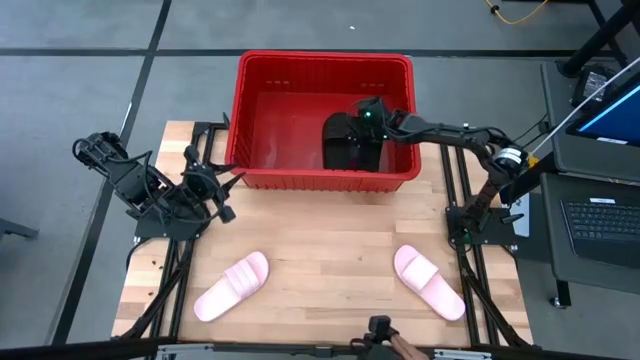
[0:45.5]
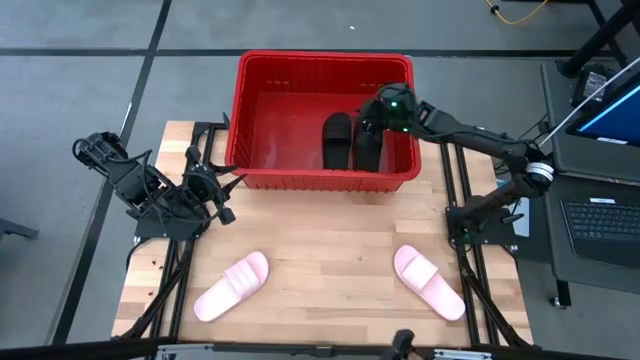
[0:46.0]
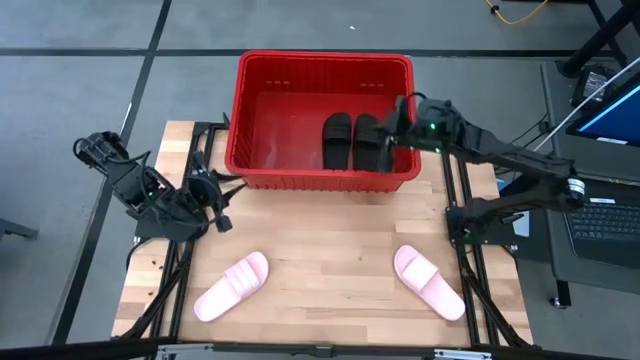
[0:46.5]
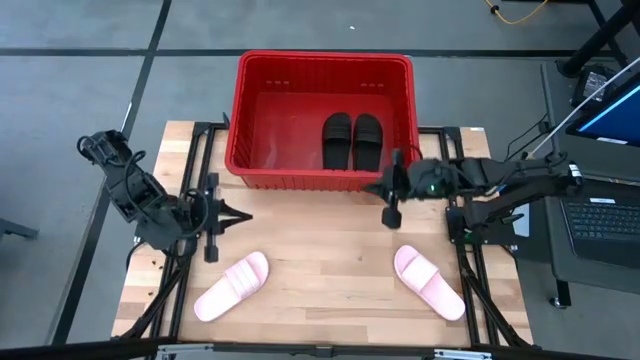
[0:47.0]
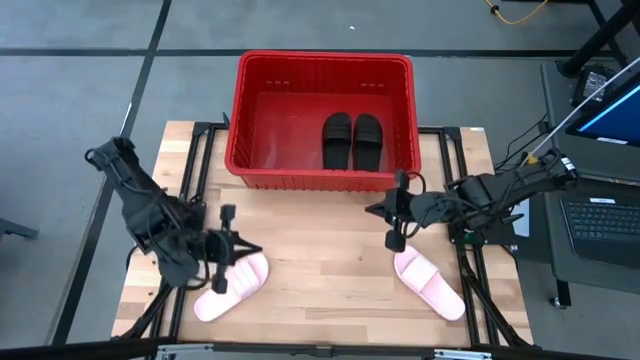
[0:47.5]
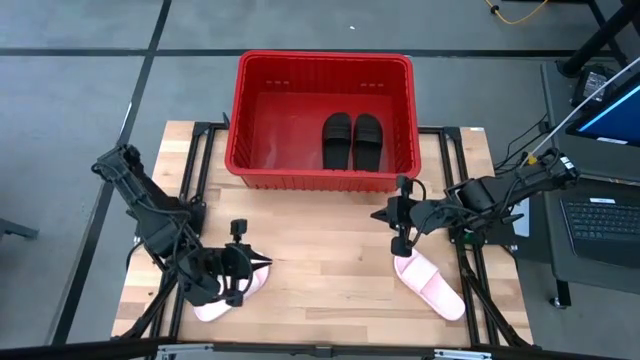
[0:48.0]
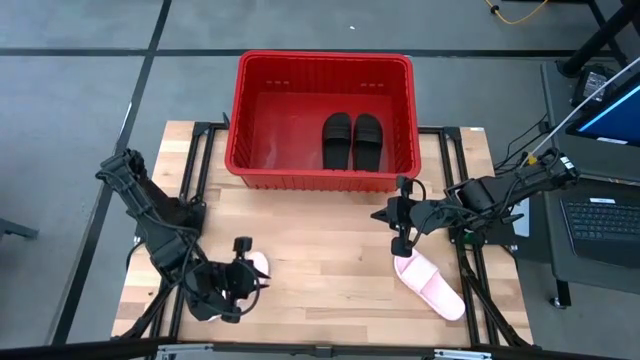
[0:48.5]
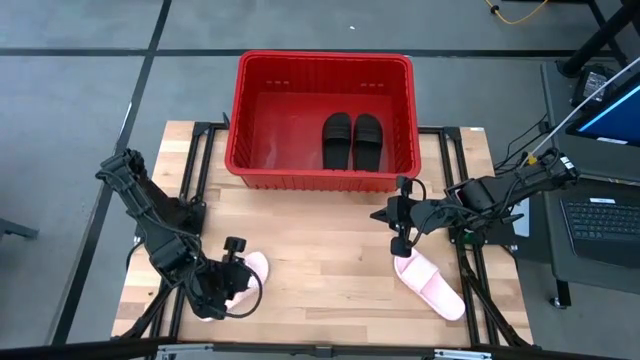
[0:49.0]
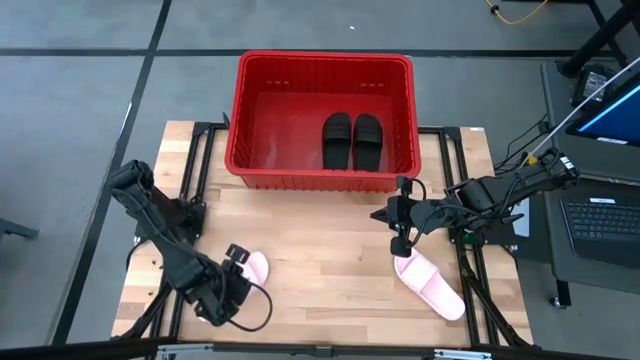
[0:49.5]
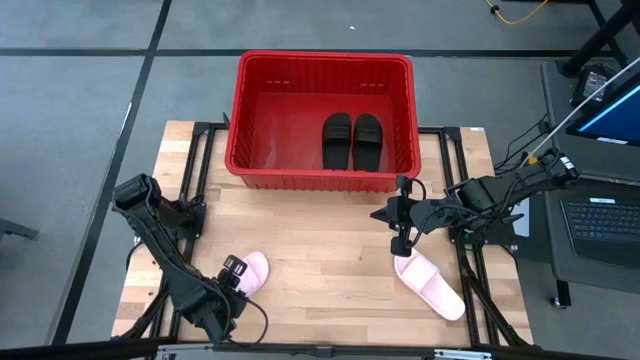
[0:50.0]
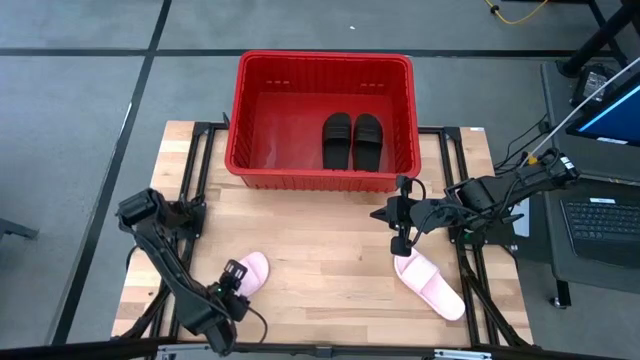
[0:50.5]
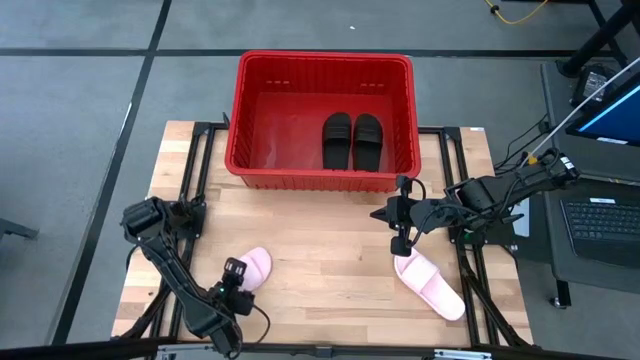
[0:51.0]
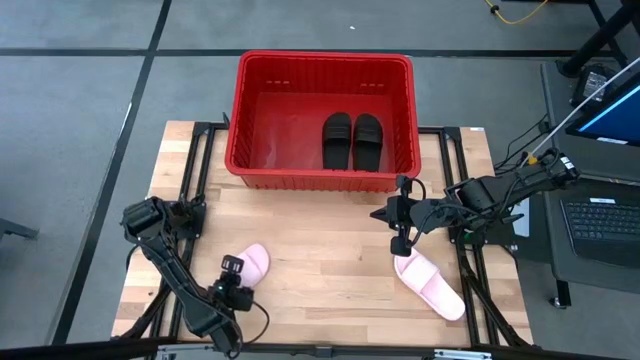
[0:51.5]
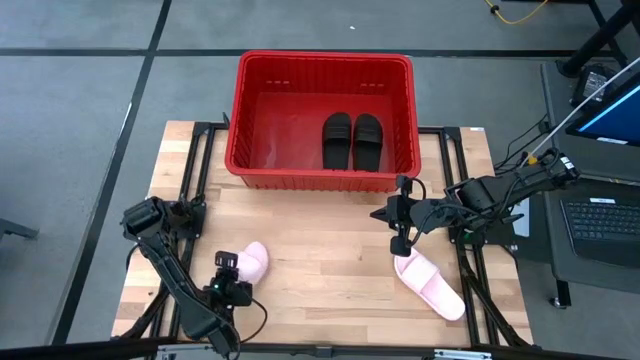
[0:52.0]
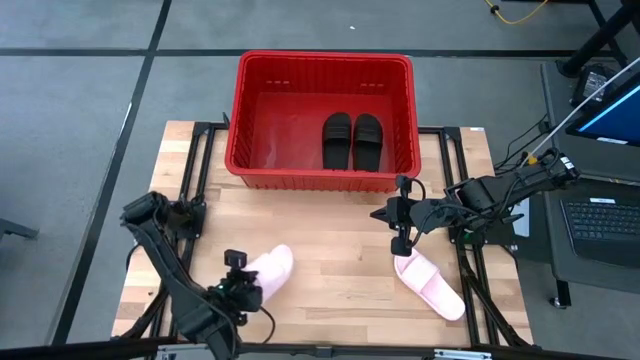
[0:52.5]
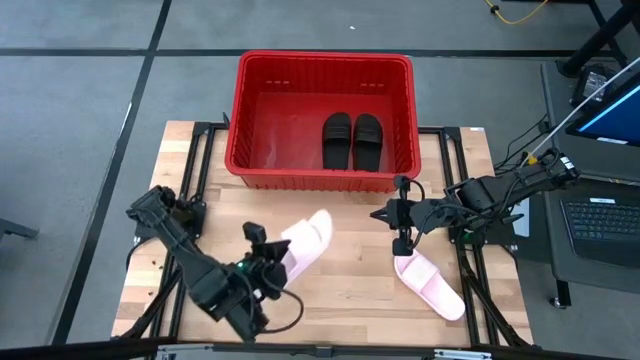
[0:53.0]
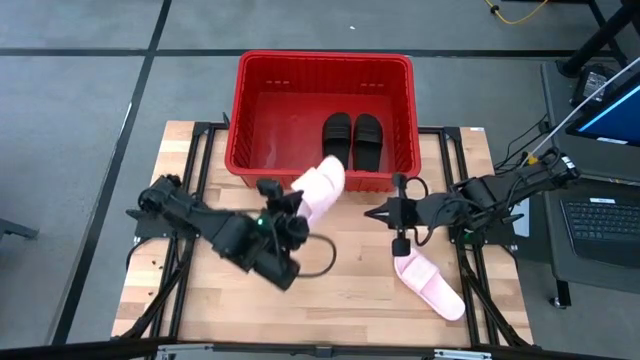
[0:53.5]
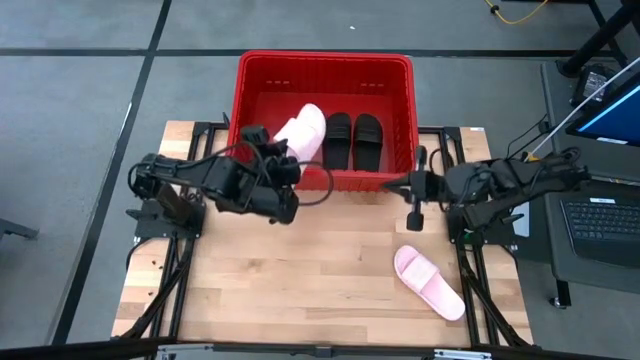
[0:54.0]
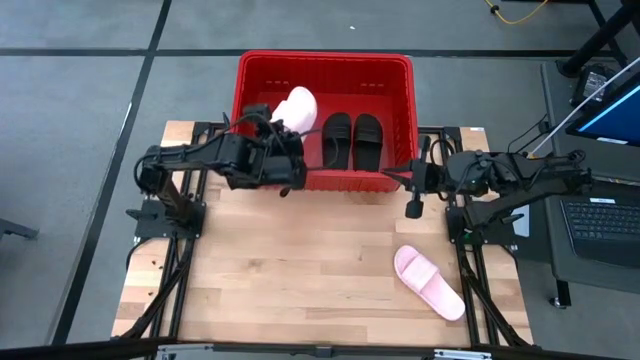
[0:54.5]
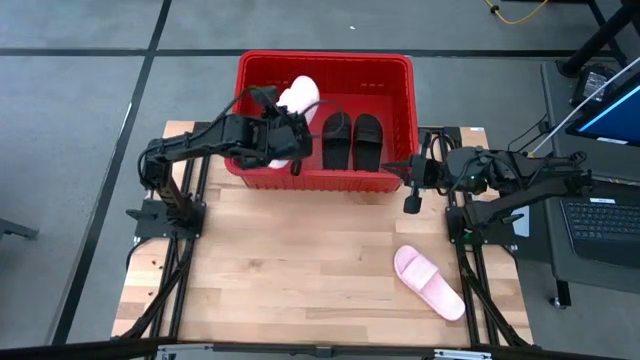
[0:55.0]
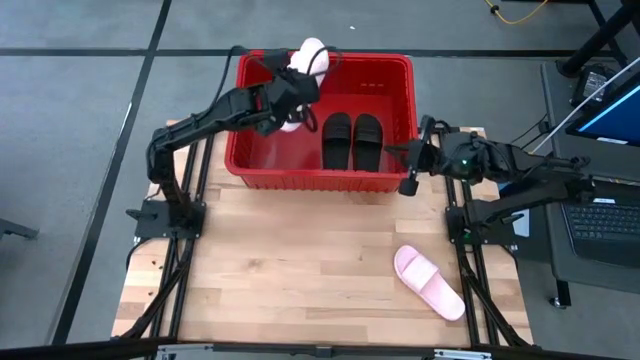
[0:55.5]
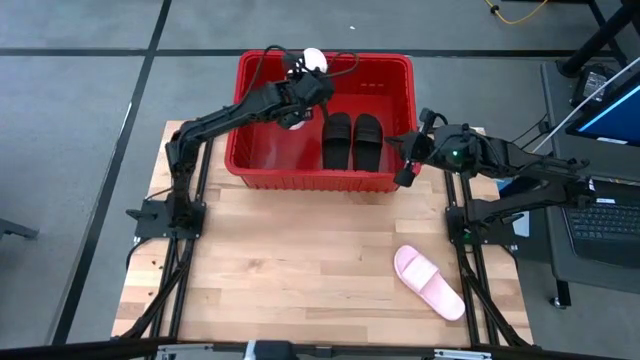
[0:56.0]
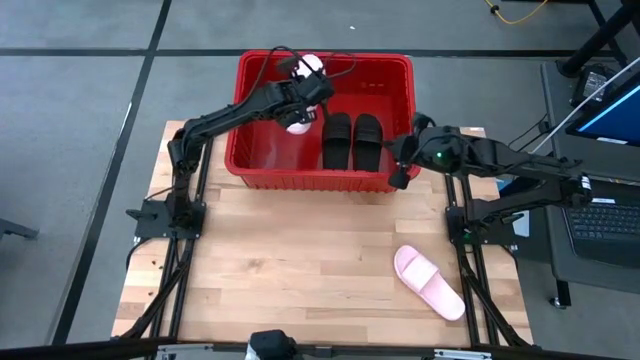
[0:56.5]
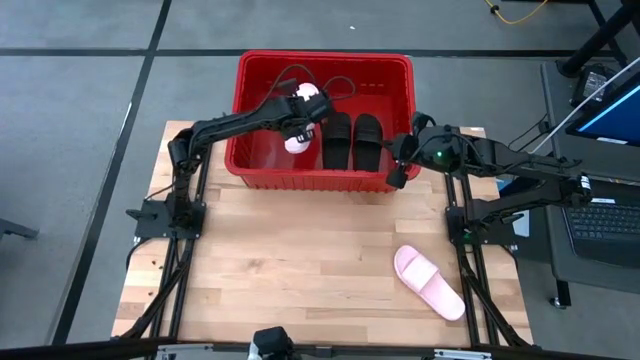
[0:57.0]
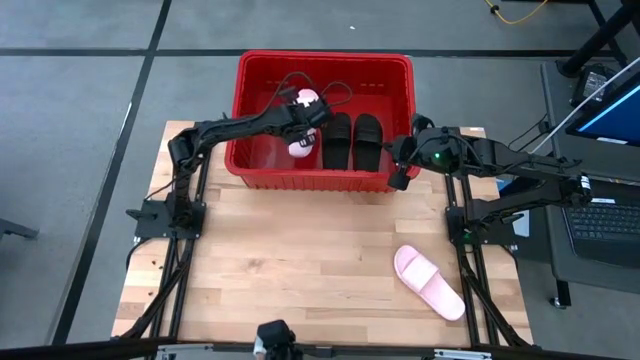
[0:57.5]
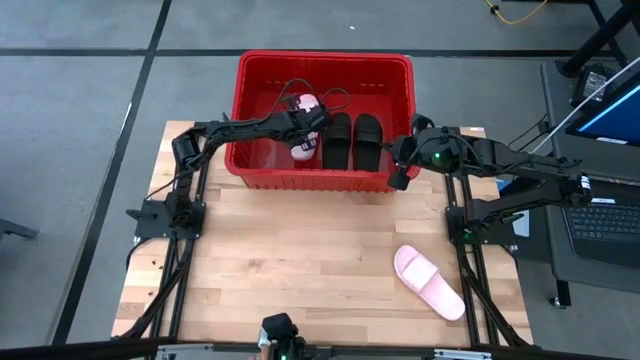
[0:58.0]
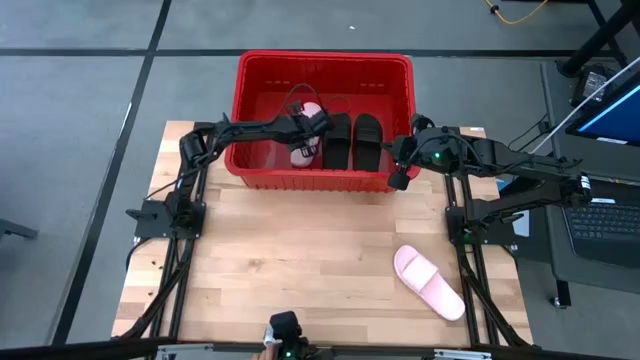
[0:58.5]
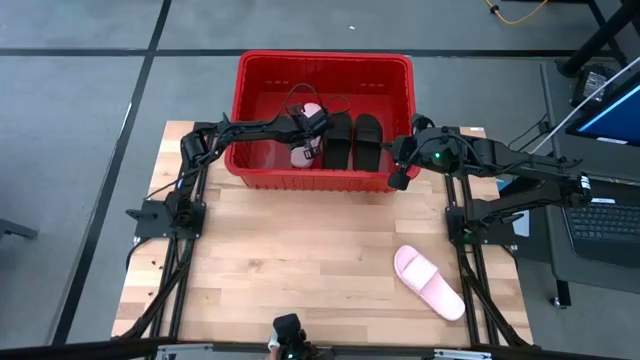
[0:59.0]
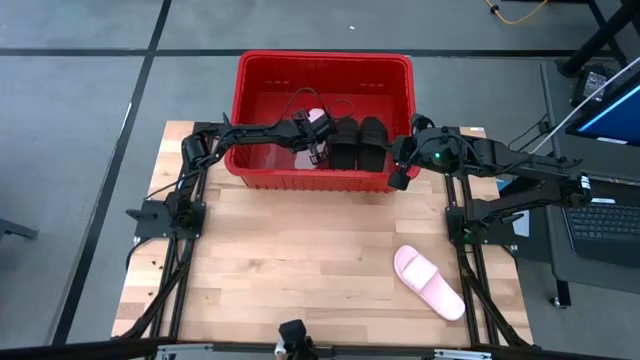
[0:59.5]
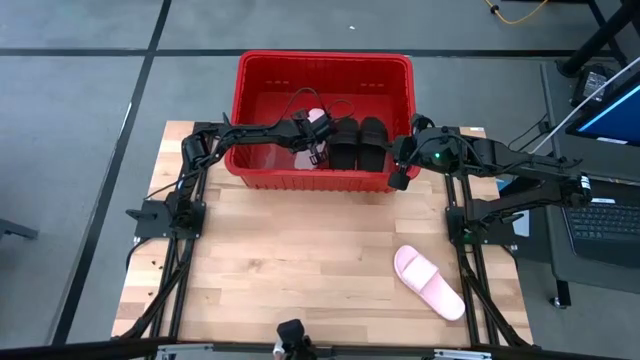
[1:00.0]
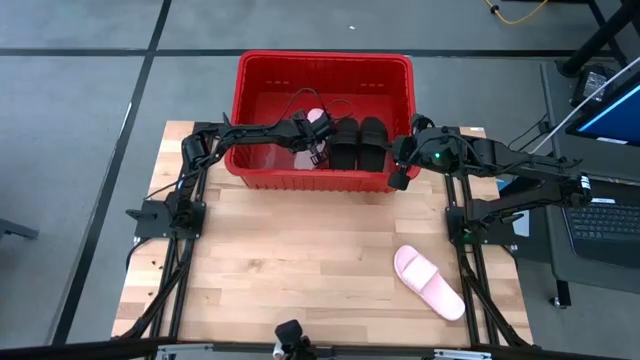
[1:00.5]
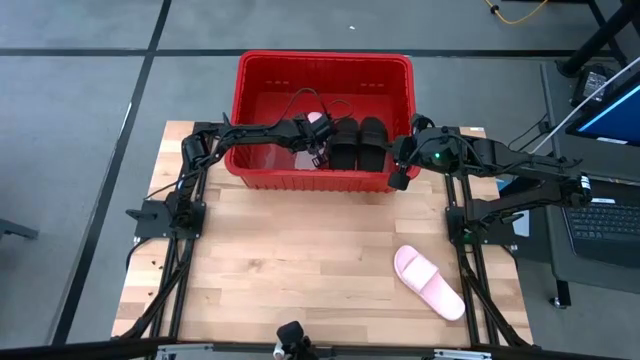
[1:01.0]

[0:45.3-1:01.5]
Task: Pick and place slides into bin
Put the left pink slide into the red bin

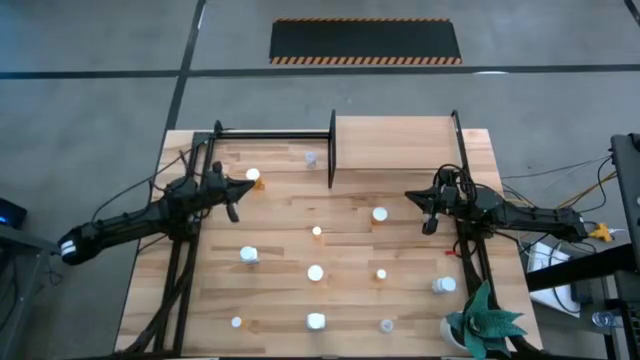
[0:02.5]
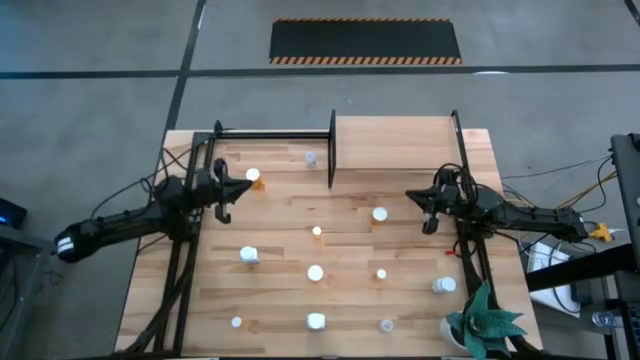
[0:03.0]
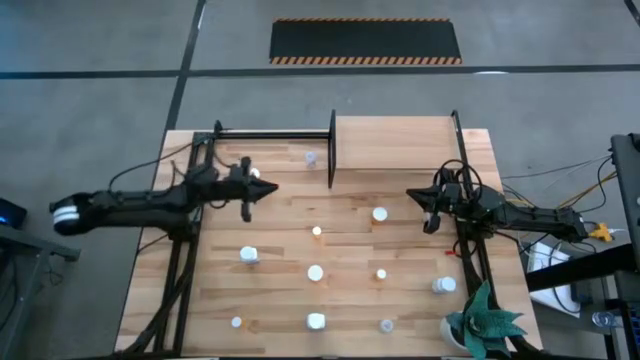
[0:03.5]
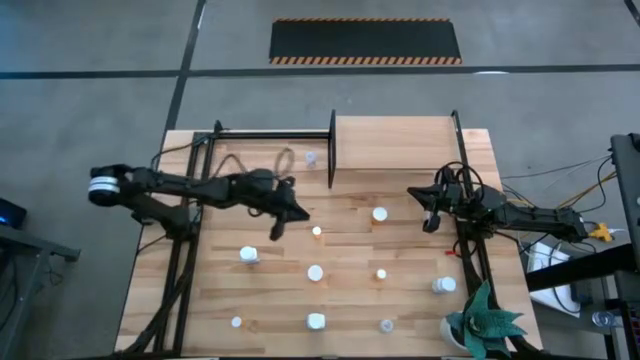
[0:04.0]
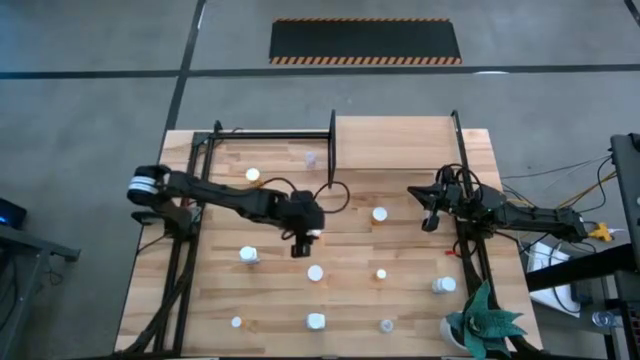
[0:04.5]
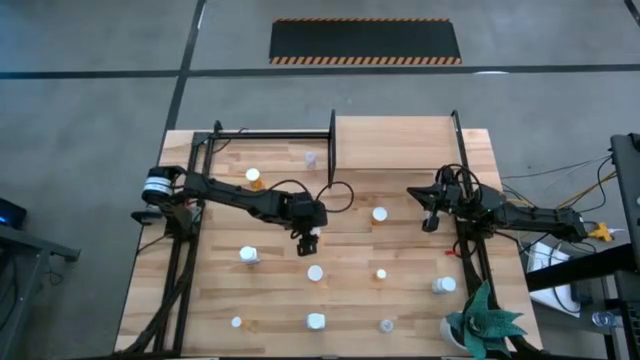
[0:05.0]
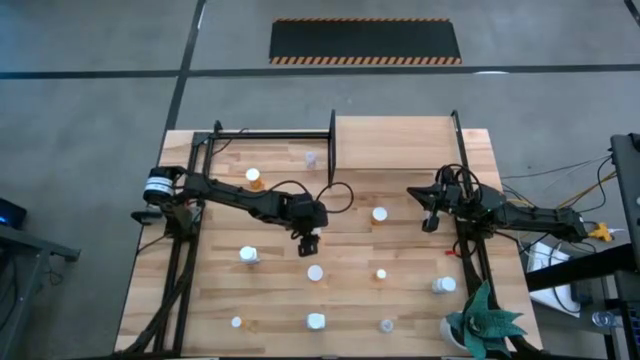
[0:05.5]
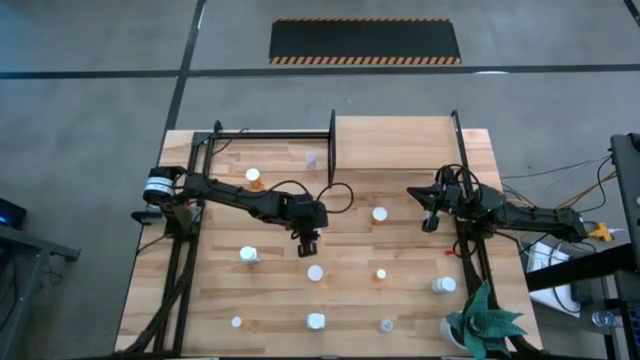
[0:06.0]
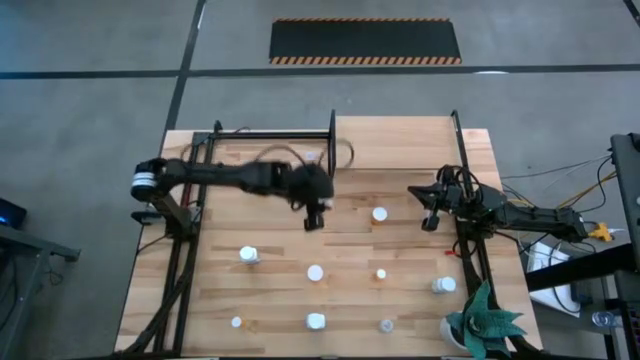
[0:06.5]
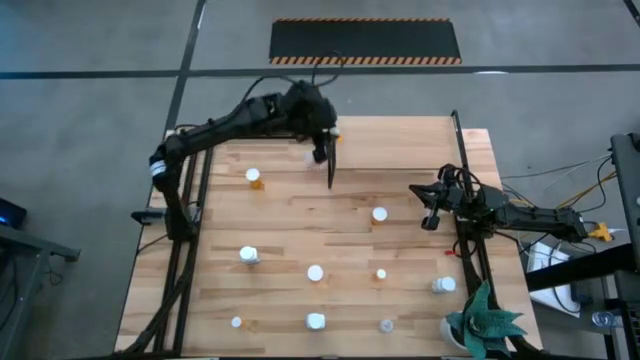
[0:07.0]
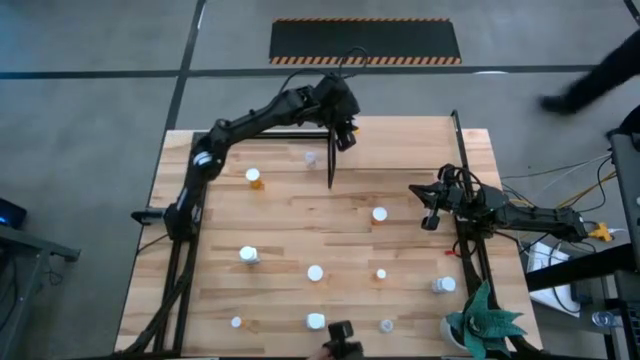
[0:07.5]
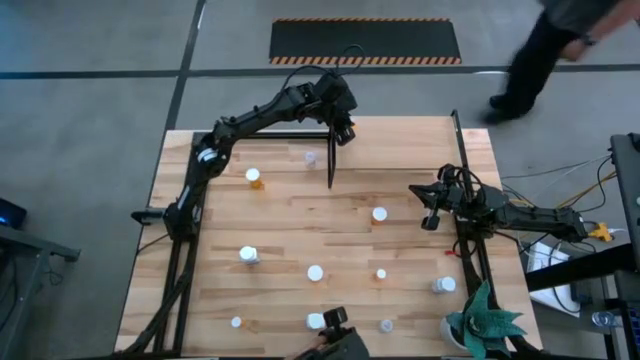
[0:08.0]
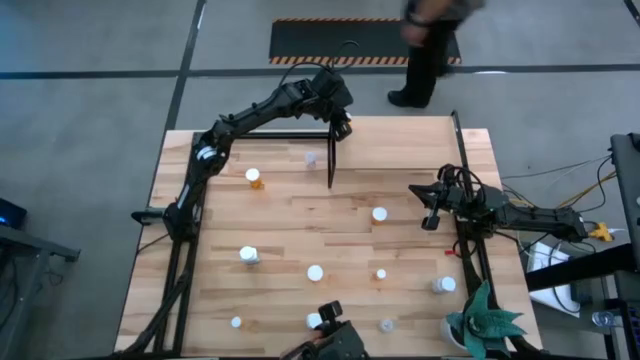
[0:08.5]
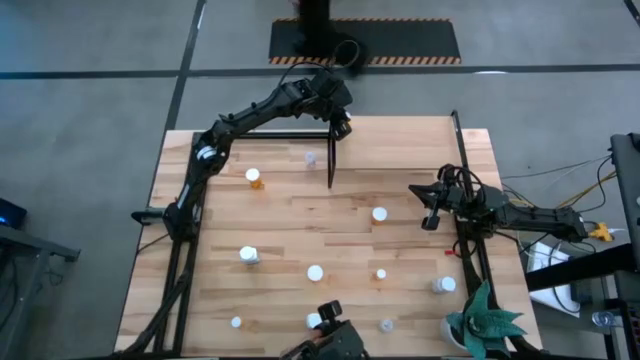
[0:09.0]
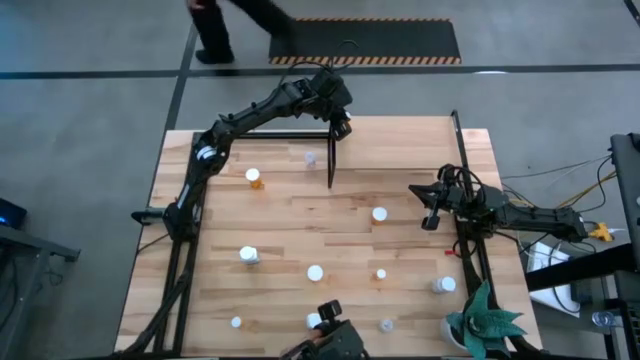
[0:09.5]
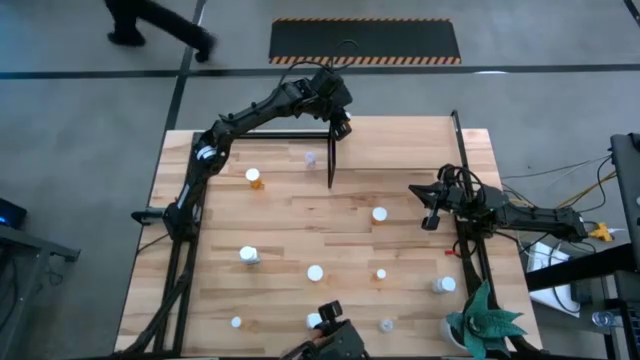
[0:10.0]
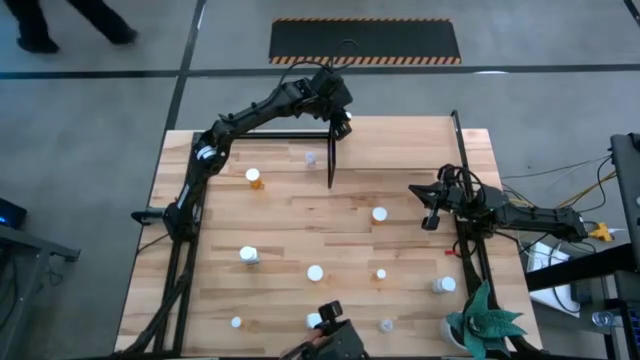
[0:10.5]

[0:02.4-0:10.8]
Task: Pick and place medicine bottles onto shelf by color
Put the top small orange pill bottle on the shelf
